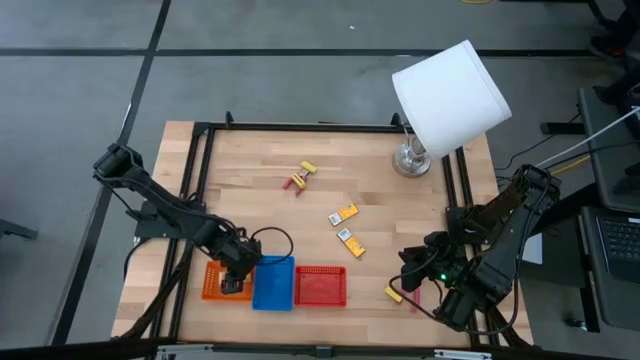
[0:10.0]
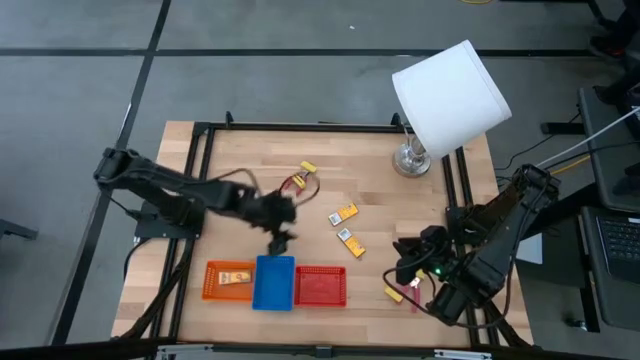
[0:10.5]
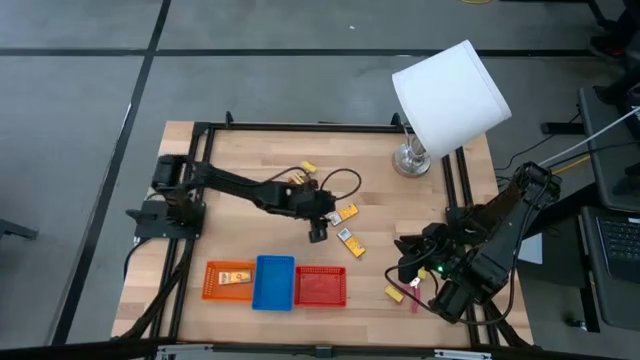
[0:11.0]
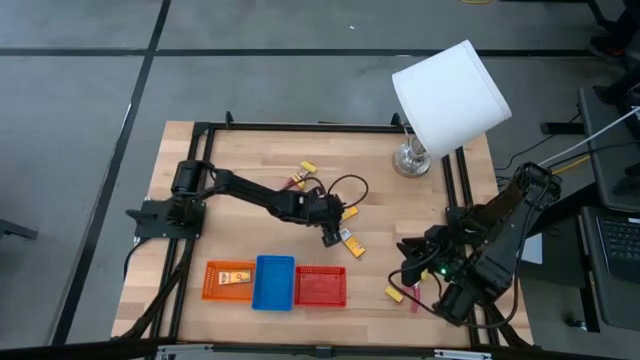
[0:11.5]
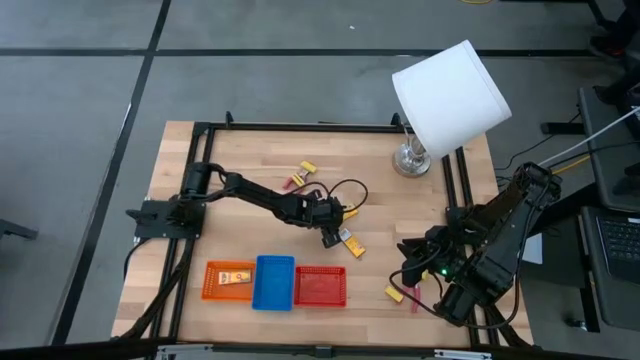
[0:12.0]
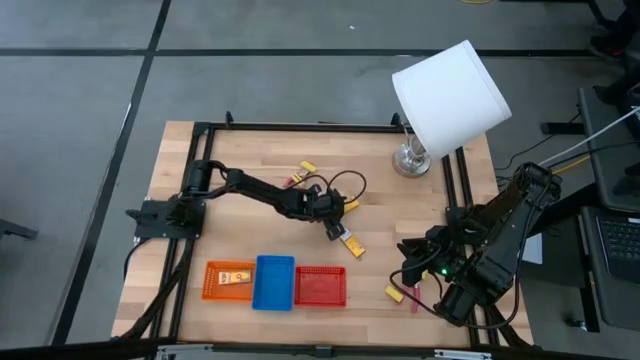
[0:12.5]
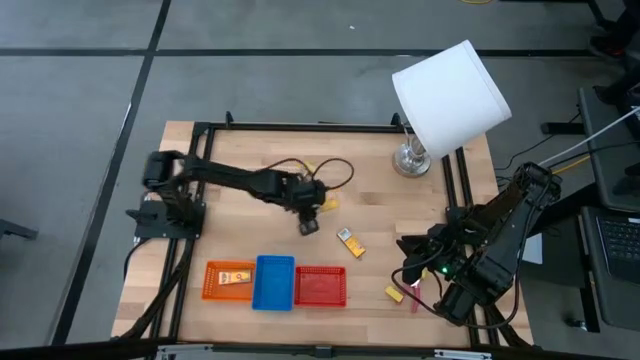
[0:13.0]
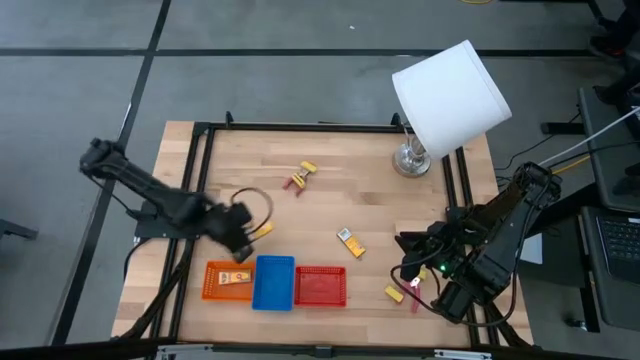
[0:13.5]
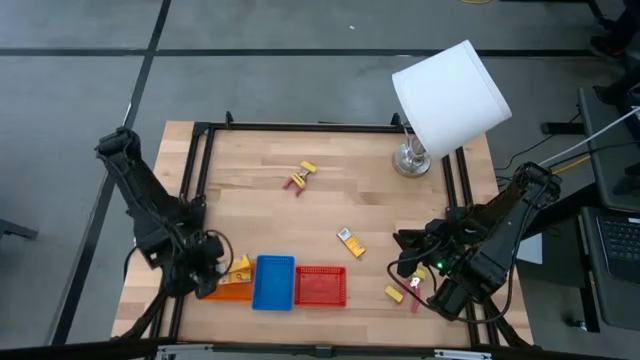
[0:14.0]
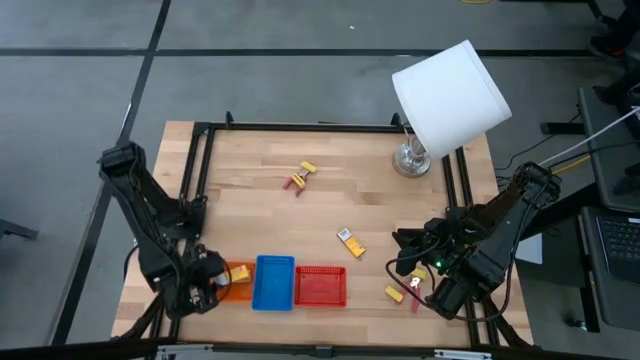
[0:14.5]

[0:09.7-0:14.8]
Task: Pick & Place School Supplies
Put the top crayon box into the orange bin

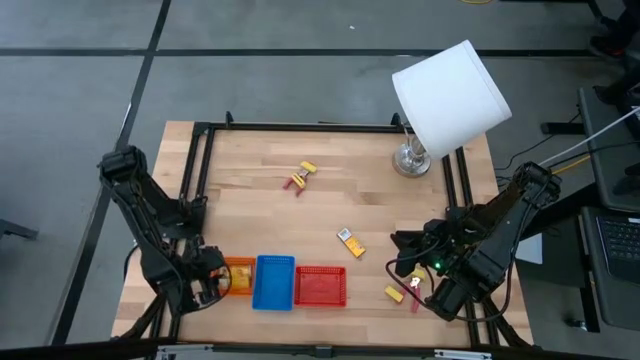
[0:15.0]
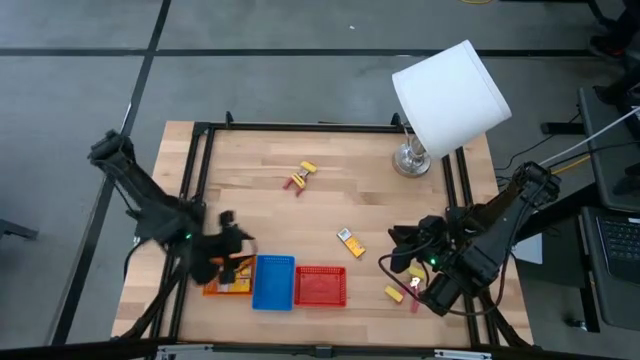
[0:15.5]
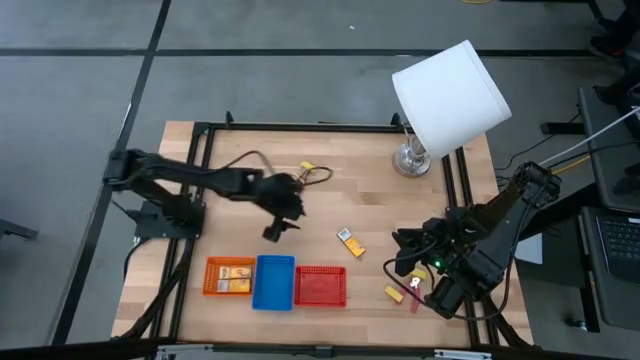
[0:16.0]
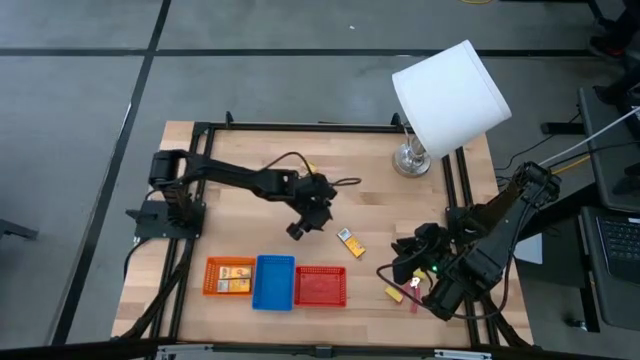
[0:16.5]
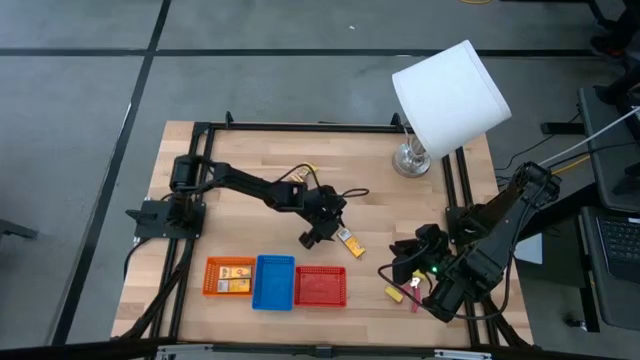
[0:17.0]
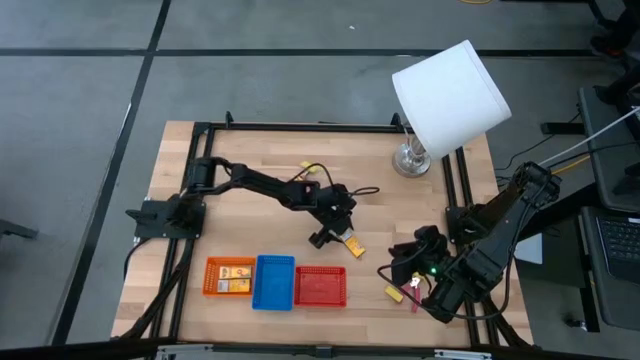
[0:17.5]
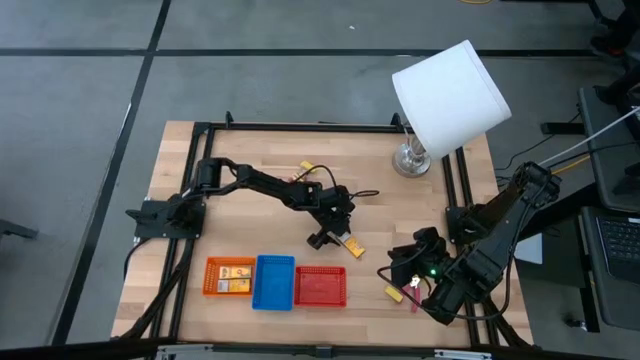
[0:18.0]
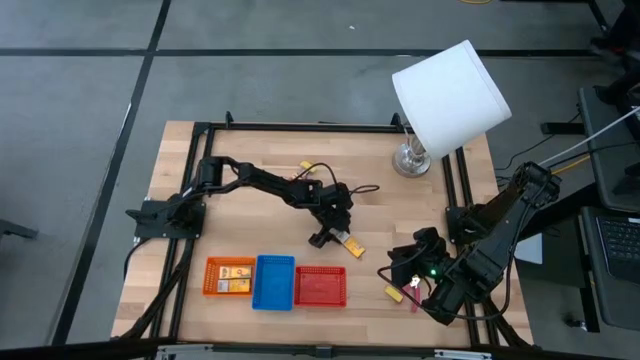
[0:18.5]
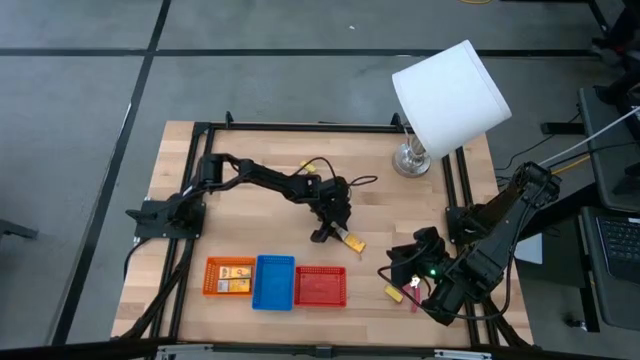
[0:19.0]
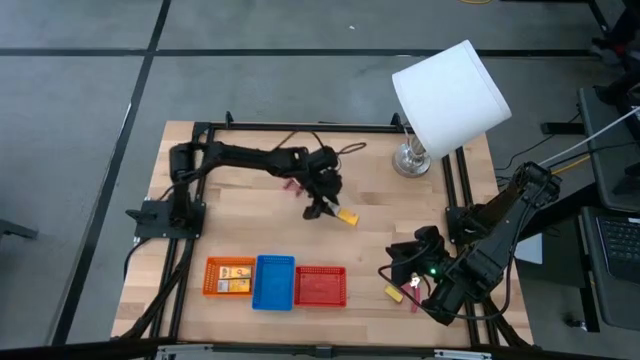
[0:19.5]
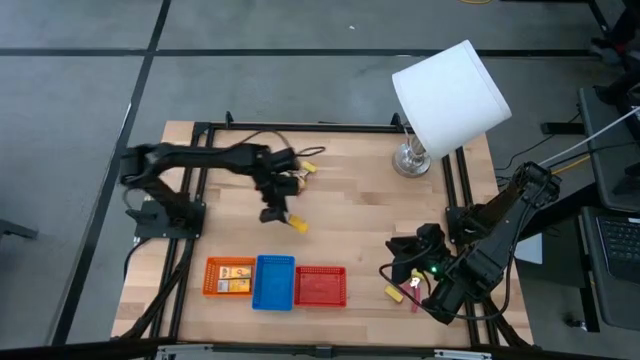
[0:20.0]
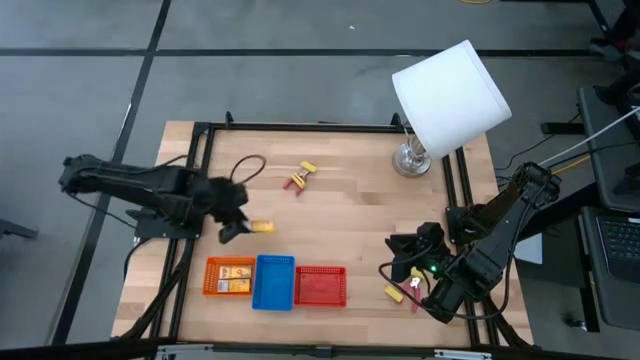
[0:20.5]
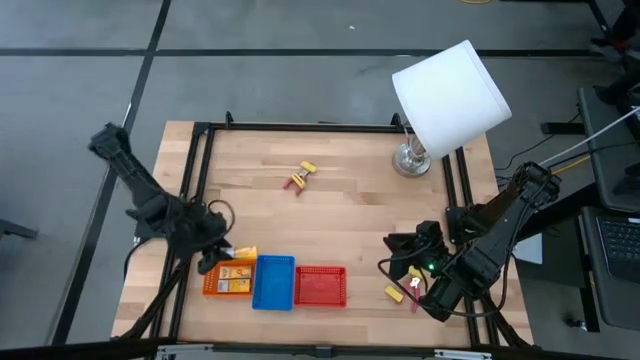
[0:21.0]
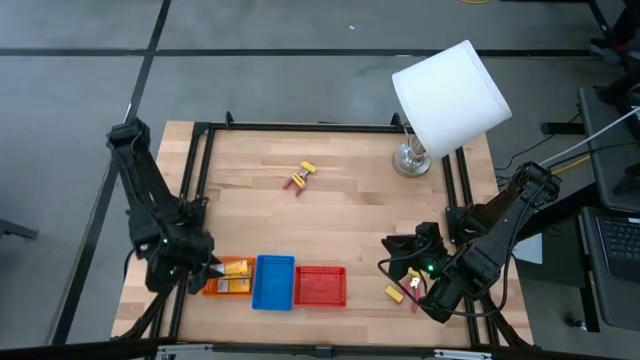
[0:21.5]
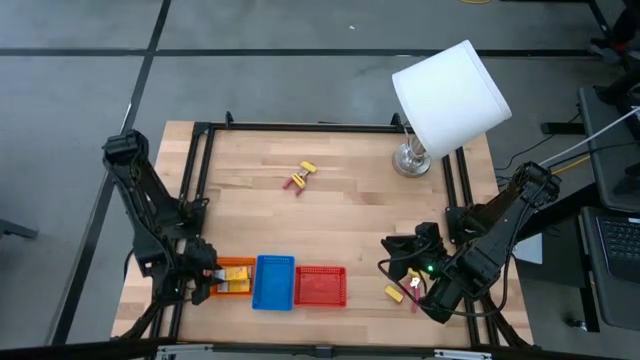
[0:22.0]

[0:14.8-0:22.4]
Put the crayon box into the orange bin

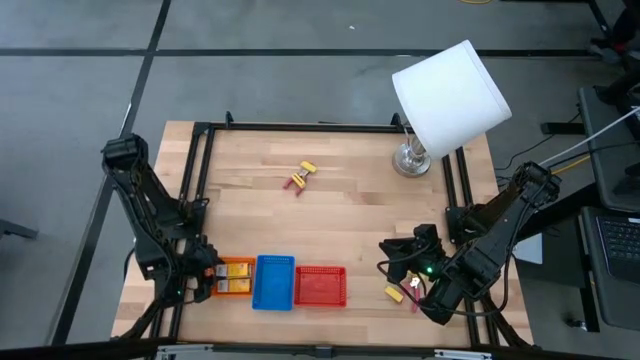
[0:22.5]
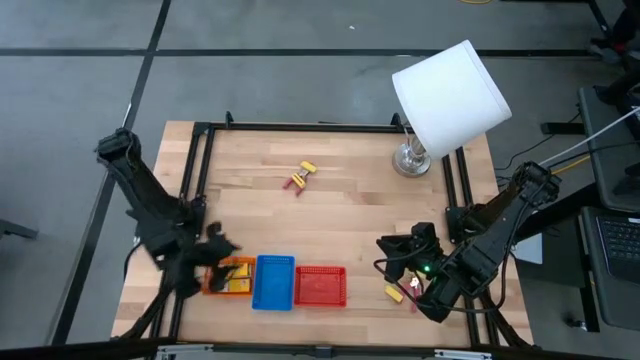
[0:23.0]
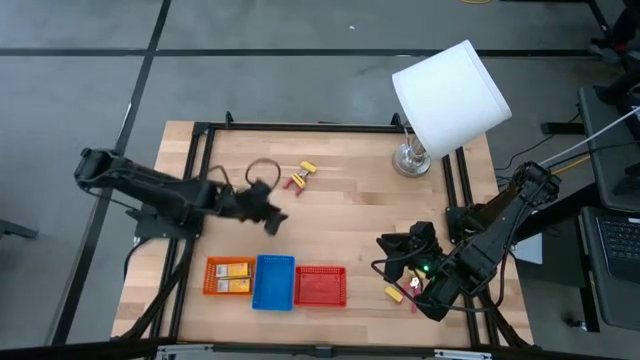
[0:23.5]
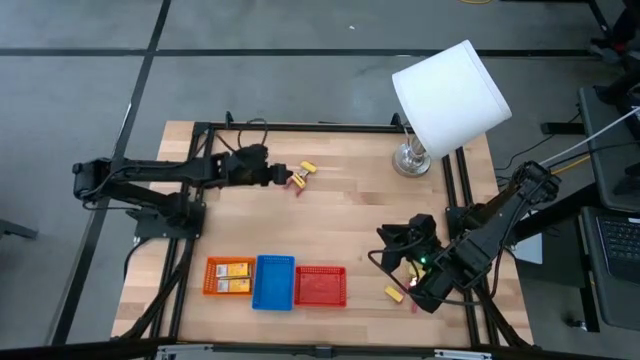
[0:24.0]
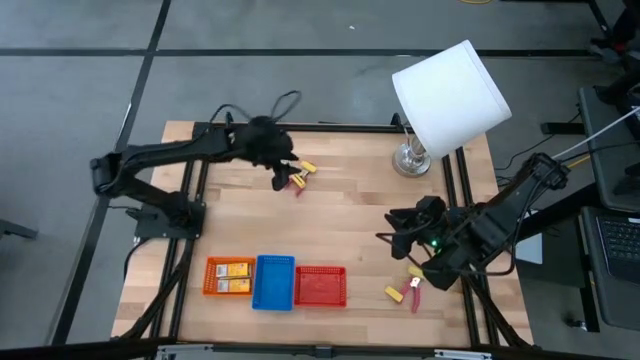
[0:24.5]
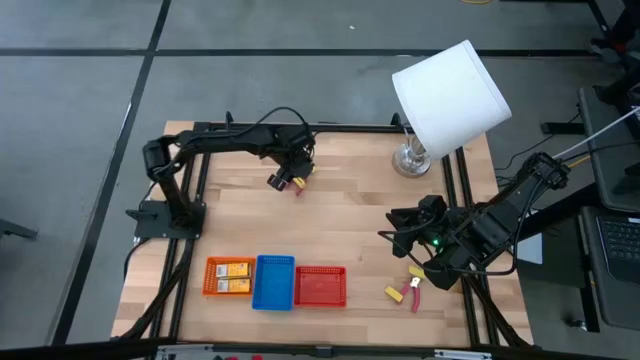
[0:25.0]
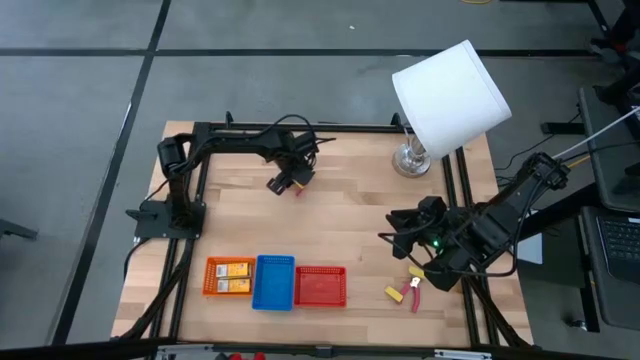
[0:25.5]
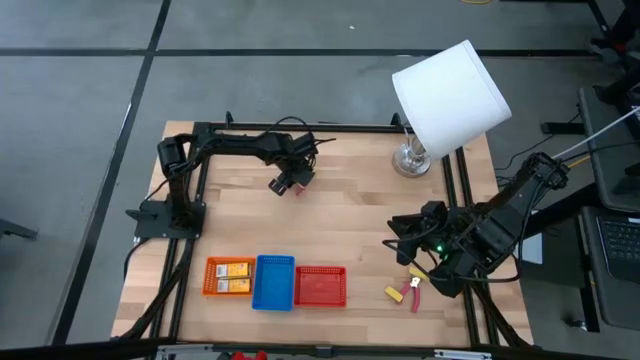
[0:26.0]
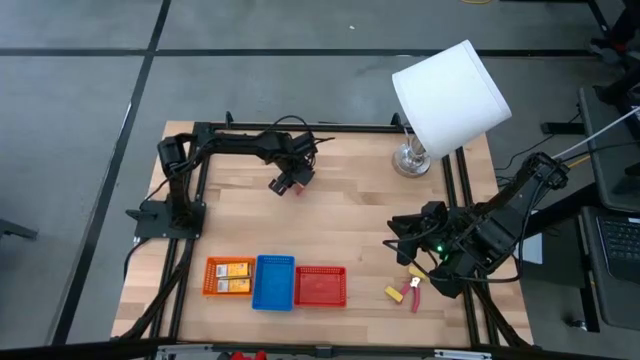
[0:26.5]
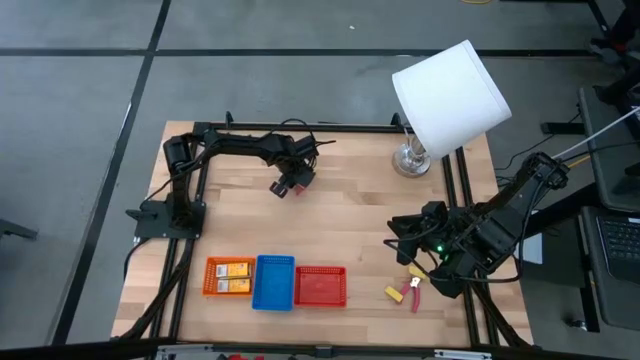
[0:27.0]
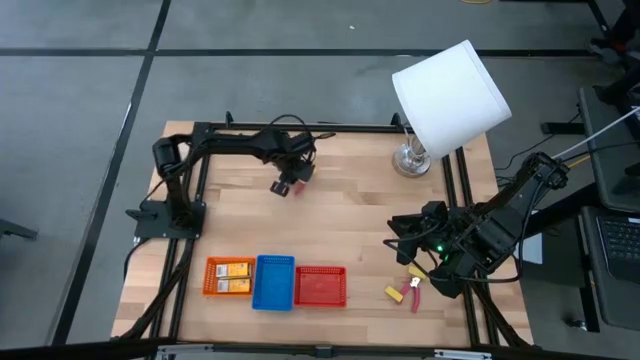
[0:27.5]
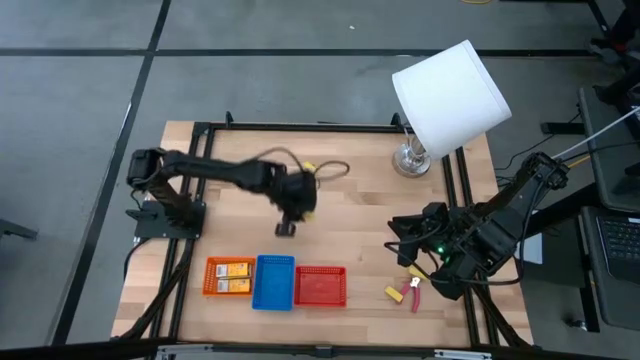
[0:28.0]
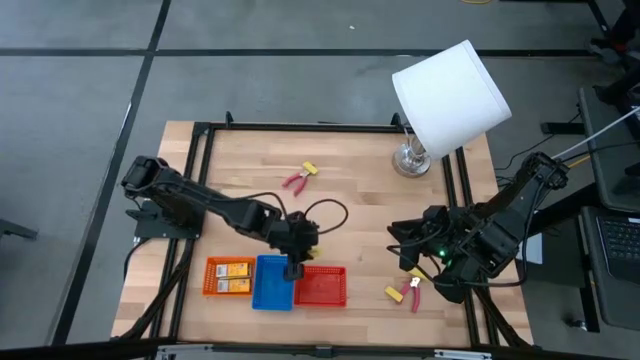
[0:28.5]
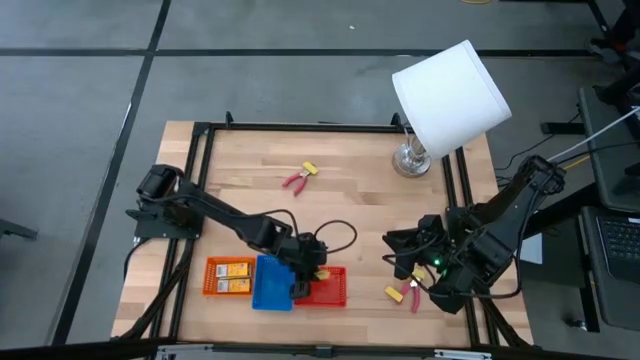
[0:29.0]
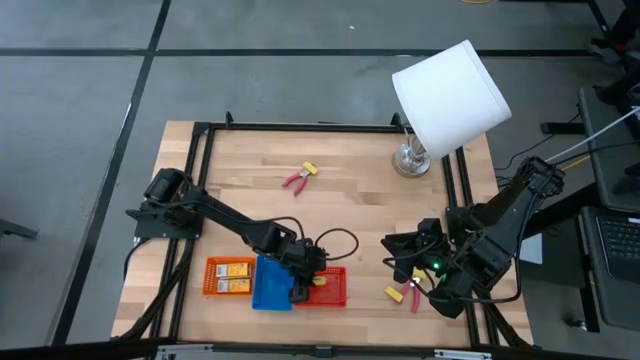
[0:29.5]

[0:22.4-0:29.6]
Put the eraser into the red bin

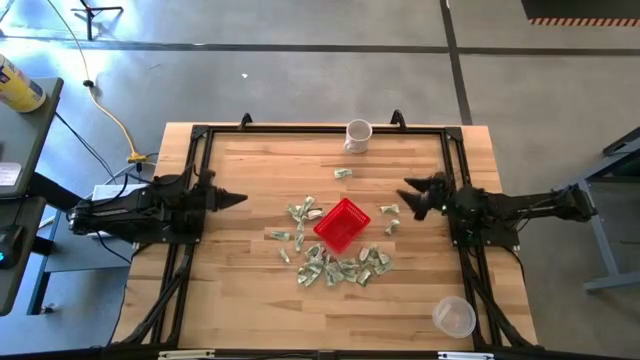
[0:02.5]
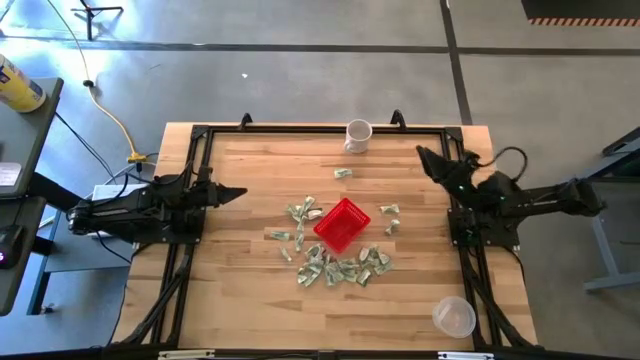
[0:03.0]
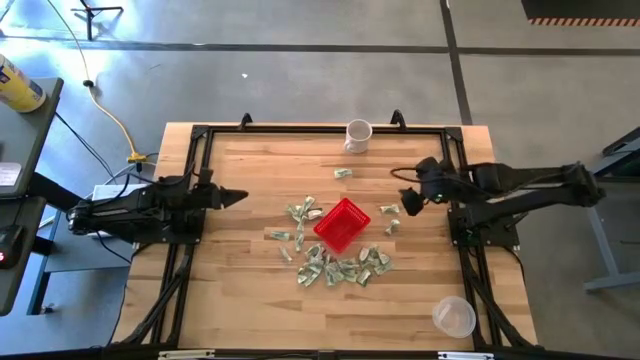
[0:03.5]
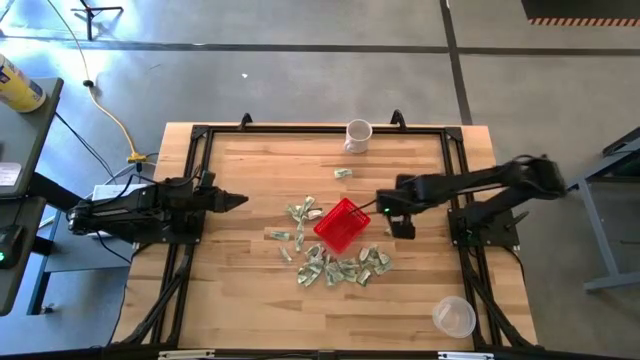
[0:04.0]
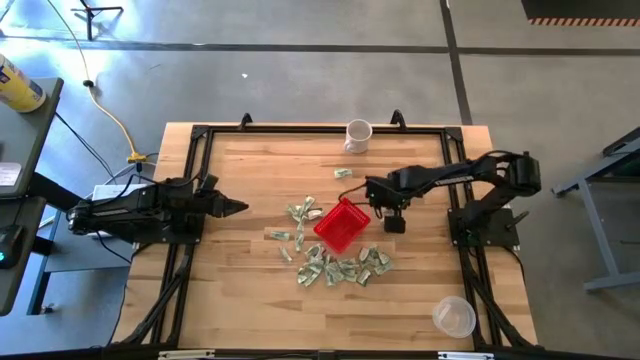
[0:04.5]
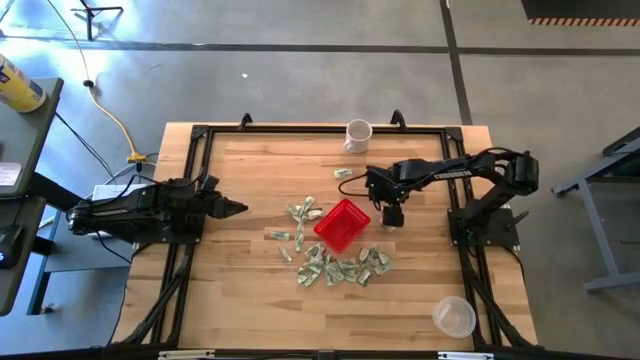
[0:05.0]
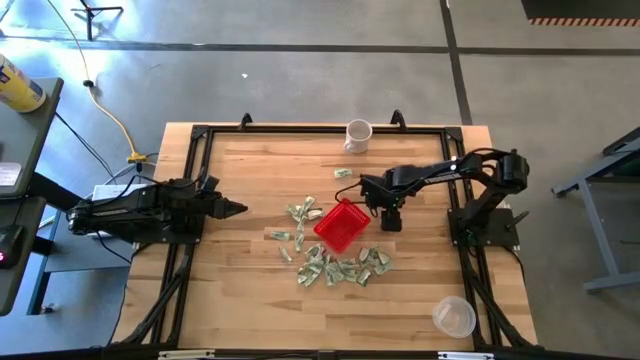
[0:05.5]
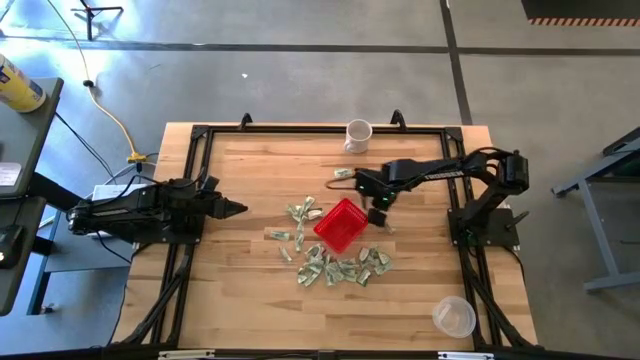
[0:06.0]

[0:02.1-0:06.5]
Task: Pick and place items into bin
Put the white stevia packet into the red bin
